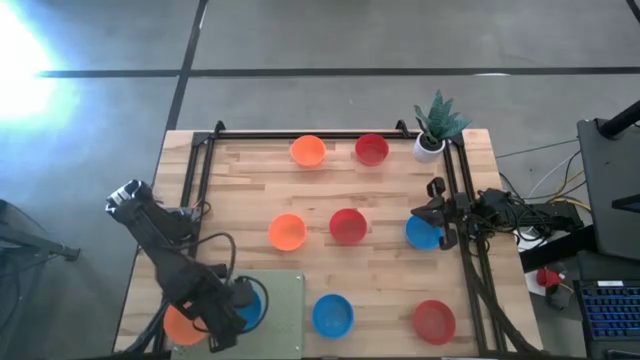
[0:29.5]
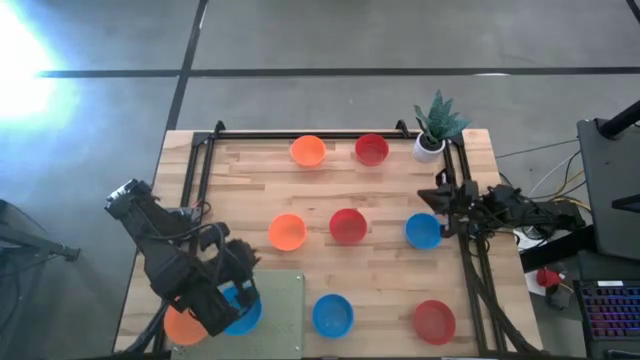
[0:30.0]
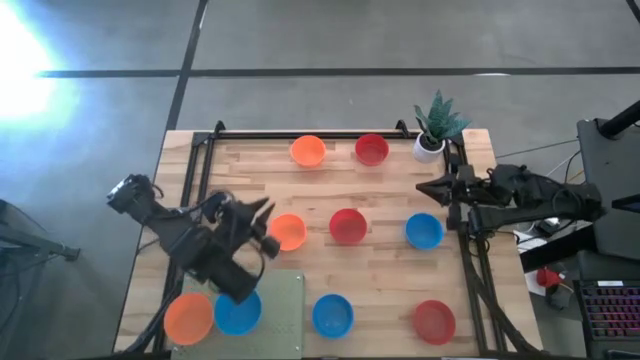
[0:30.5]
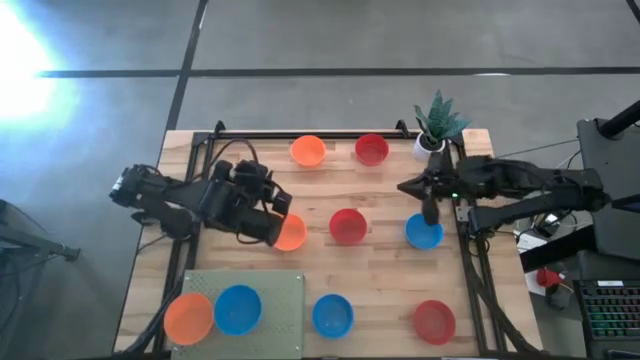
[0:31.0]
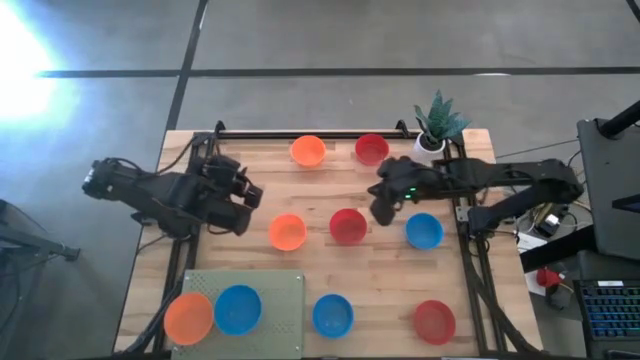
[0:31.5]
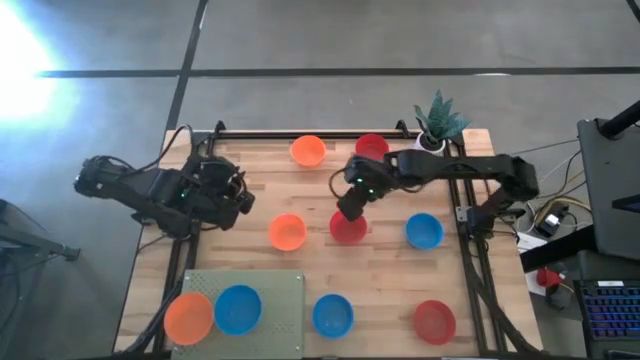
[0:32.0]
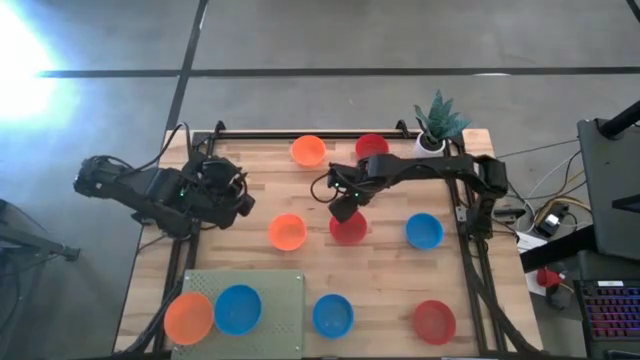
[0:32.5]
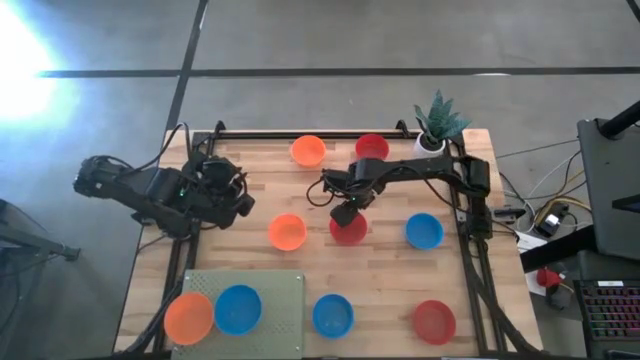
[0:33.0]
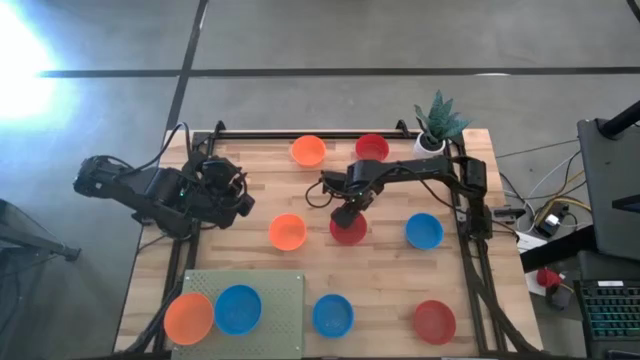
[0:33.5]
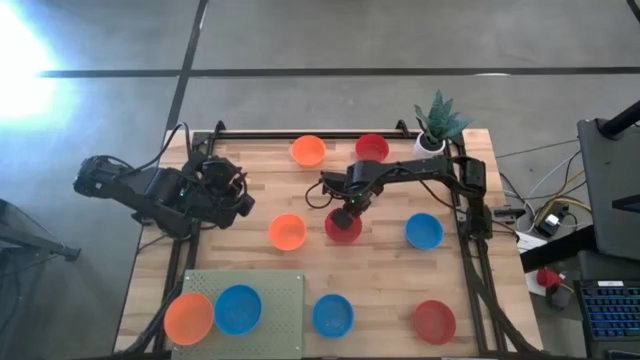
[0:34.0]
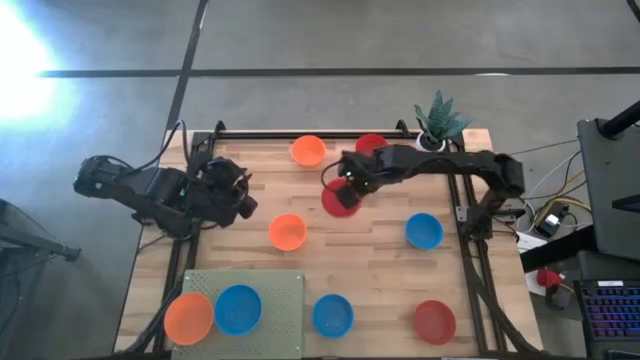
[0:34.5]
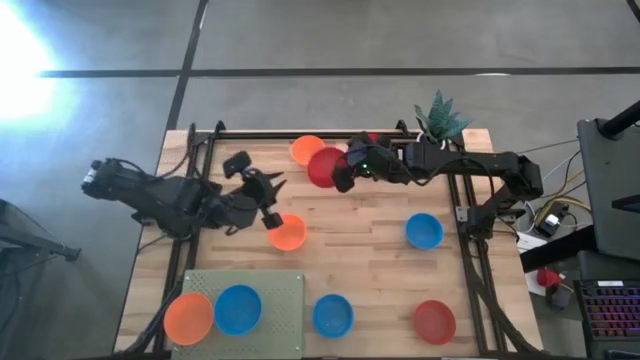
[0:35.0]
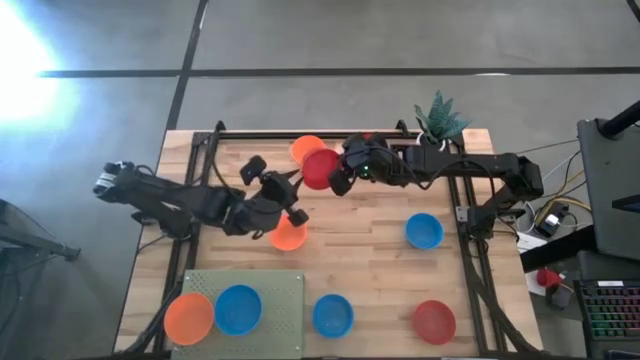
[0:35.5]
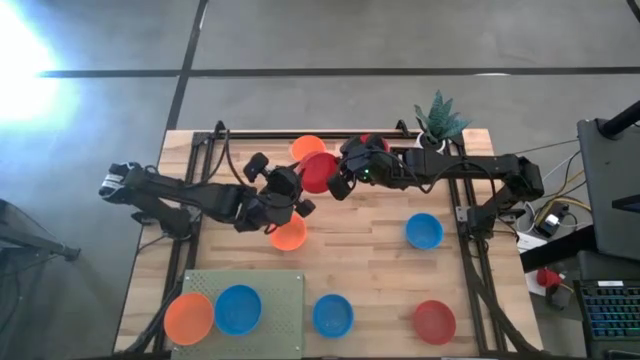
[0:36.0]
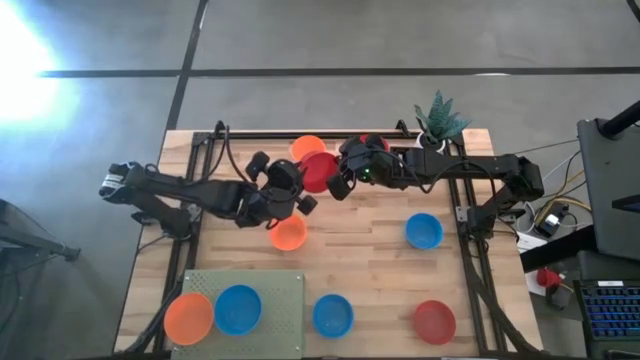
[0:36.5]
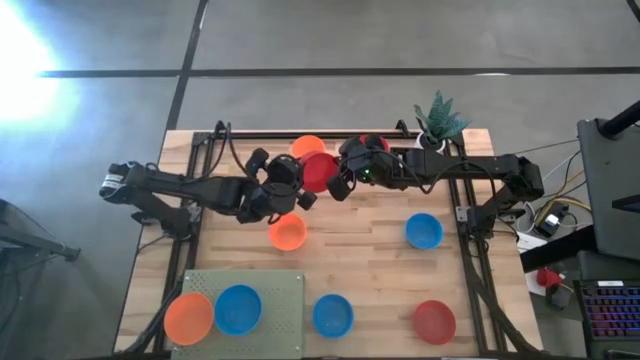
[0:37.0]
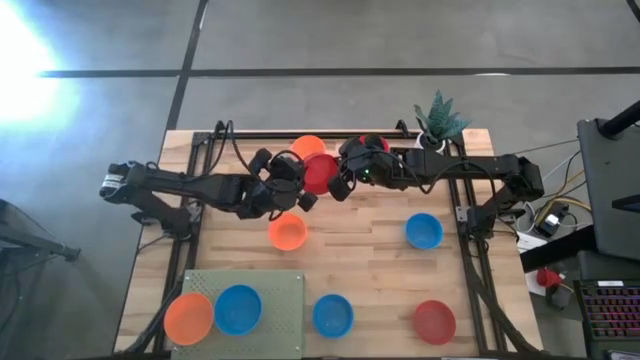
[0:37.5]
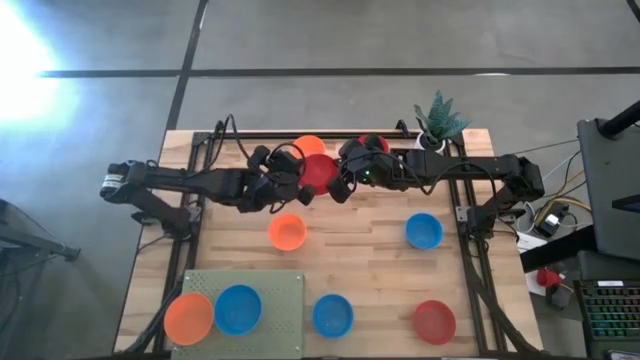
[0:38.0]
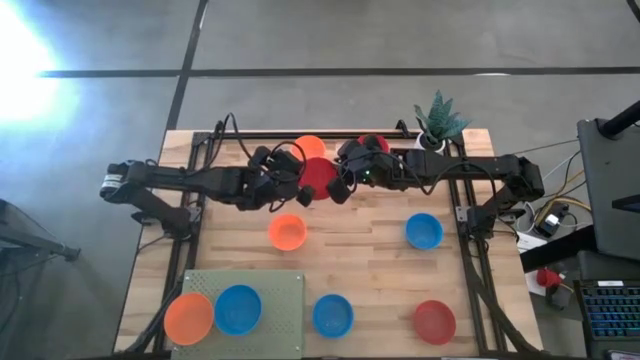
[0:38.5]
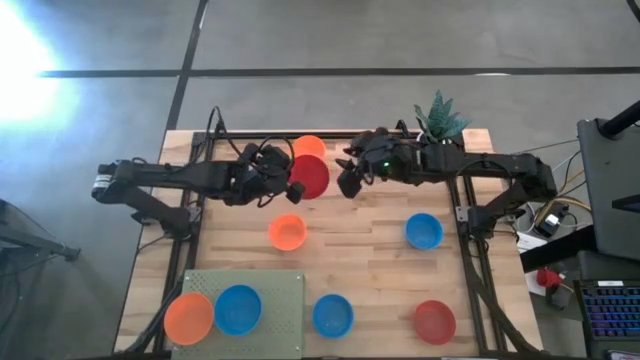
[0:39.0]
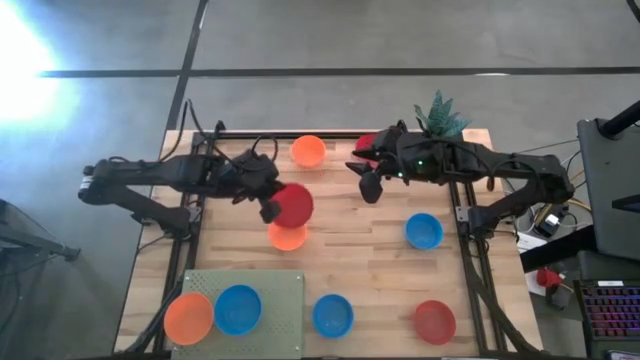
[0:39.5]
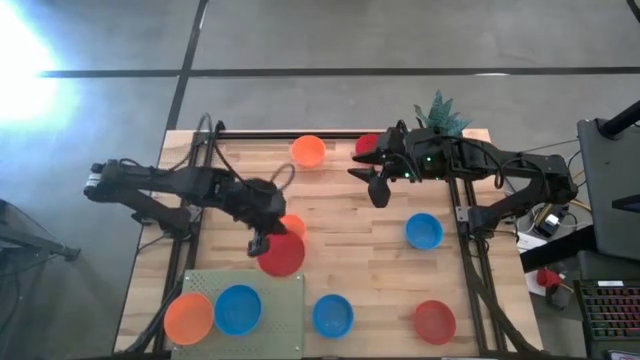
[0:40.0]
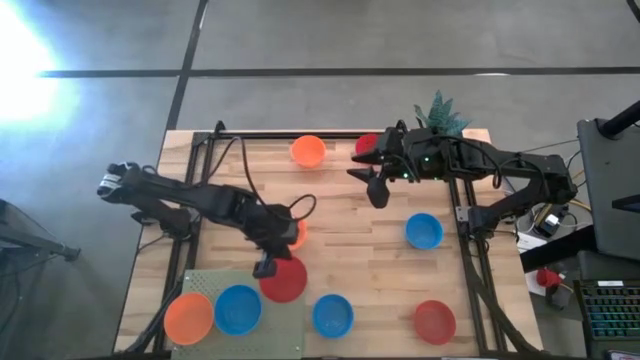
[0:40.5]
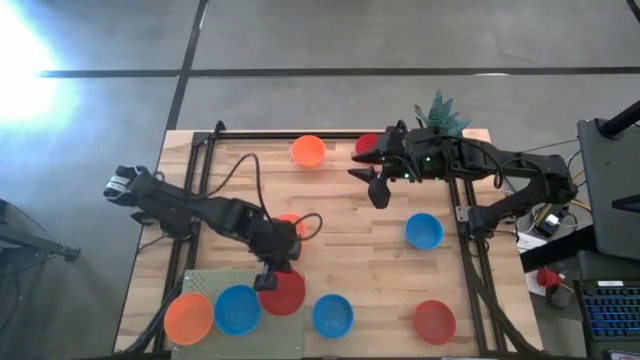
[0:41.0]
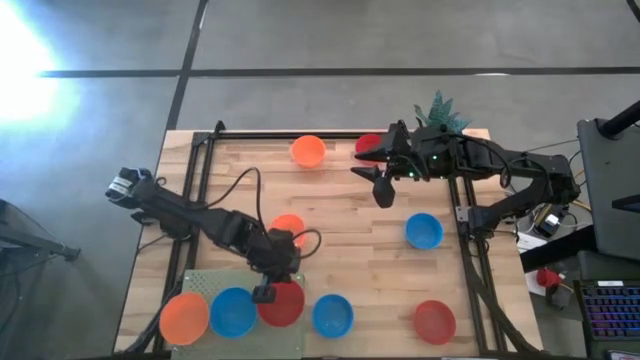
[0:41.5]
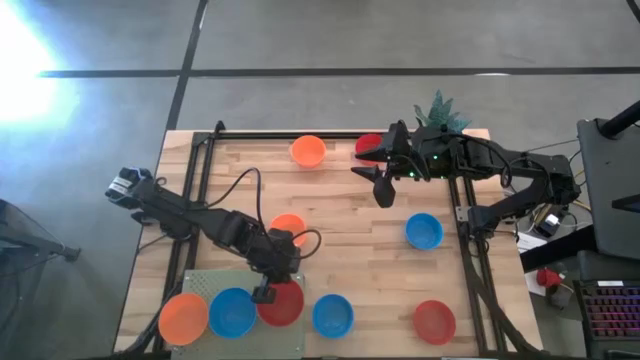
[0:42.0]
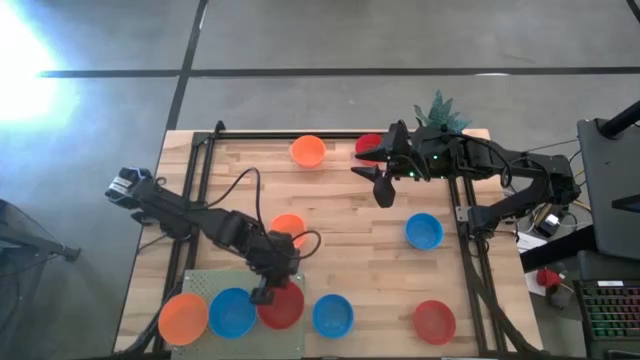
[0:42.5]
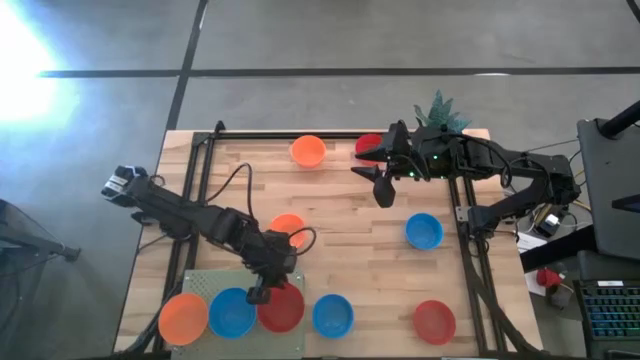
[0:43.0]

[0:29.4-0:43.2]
Task: Pick & Place Mini bowls
Put the middle left red bowl on the shelf

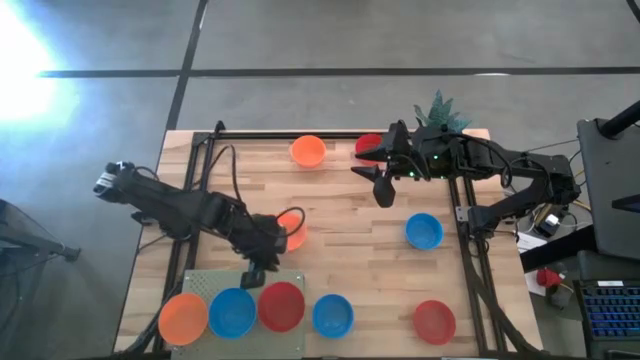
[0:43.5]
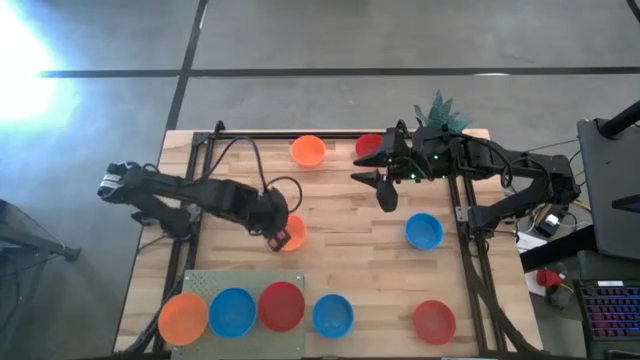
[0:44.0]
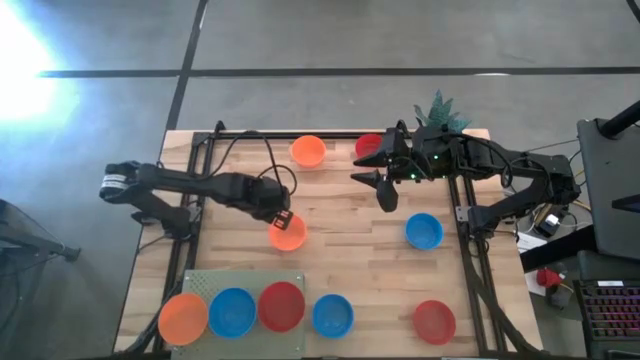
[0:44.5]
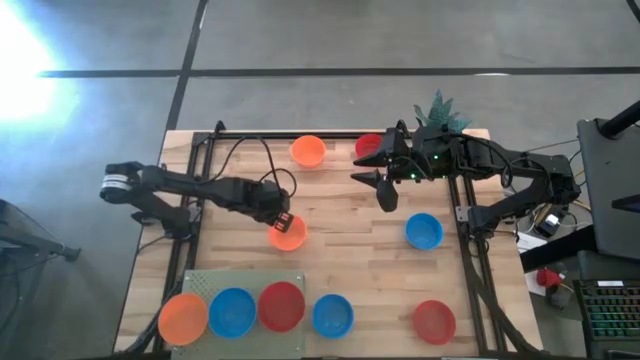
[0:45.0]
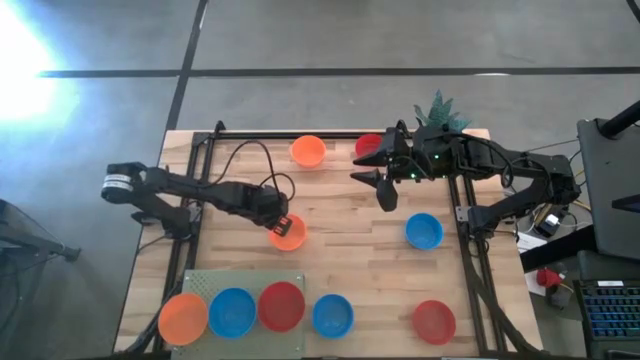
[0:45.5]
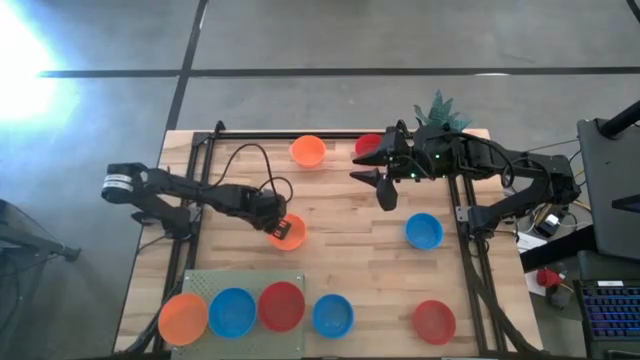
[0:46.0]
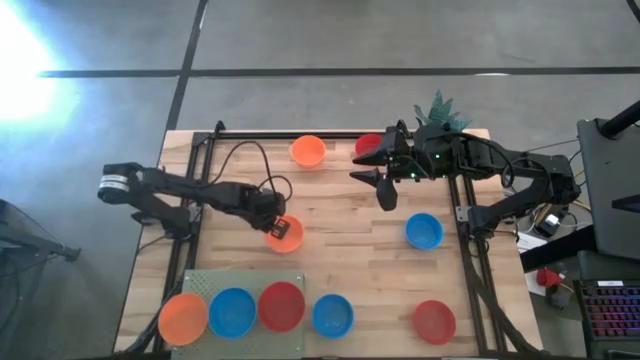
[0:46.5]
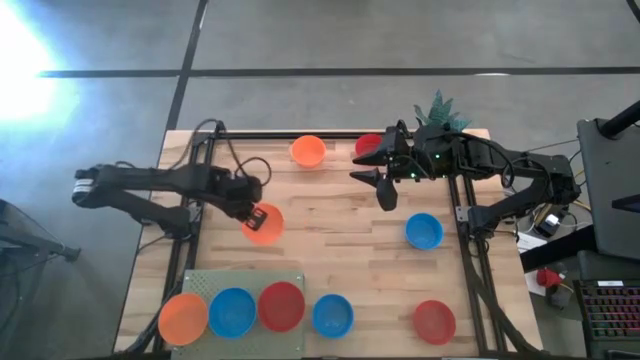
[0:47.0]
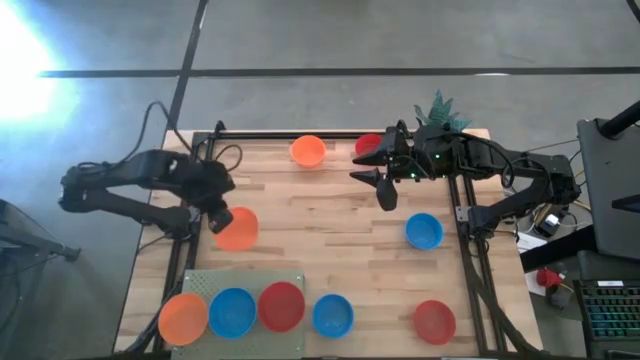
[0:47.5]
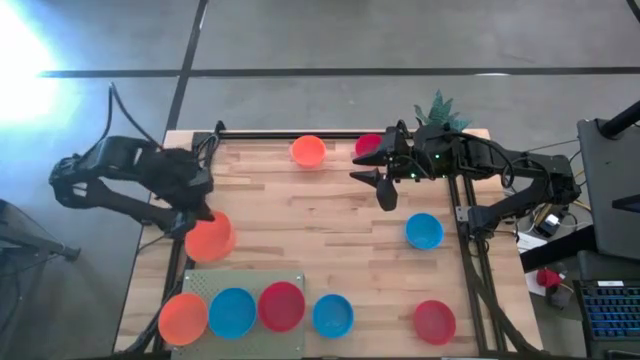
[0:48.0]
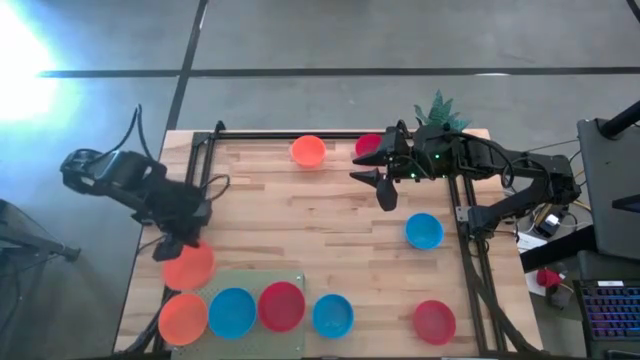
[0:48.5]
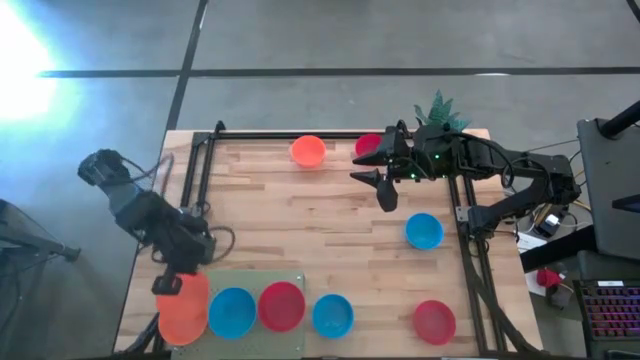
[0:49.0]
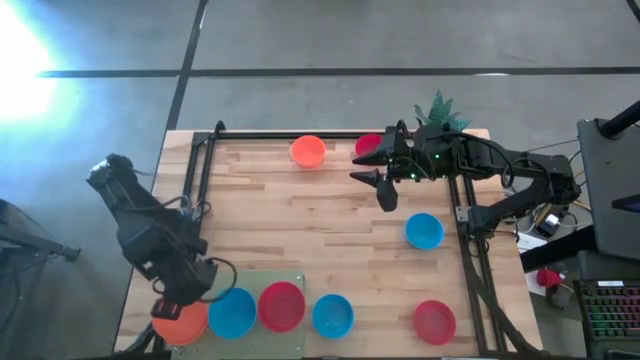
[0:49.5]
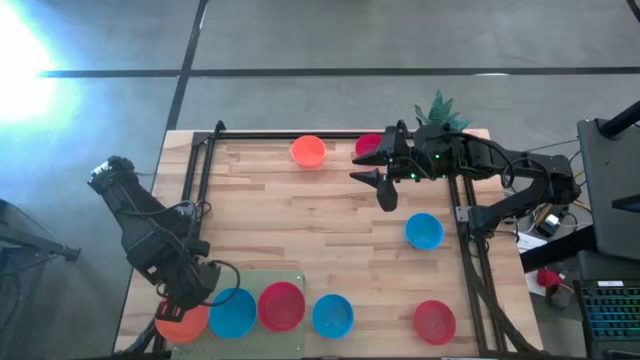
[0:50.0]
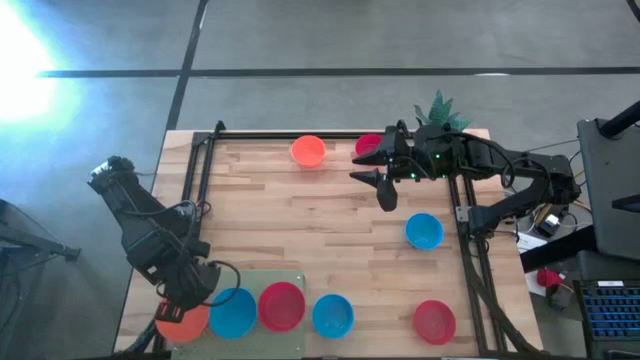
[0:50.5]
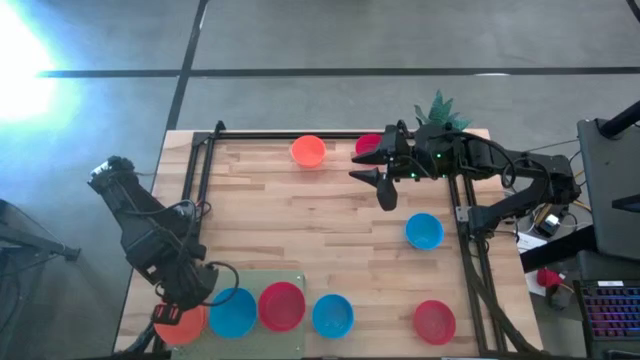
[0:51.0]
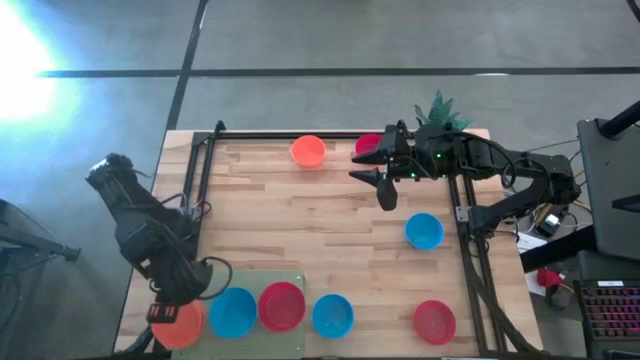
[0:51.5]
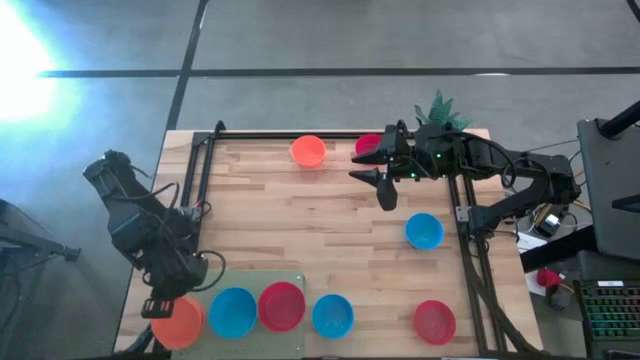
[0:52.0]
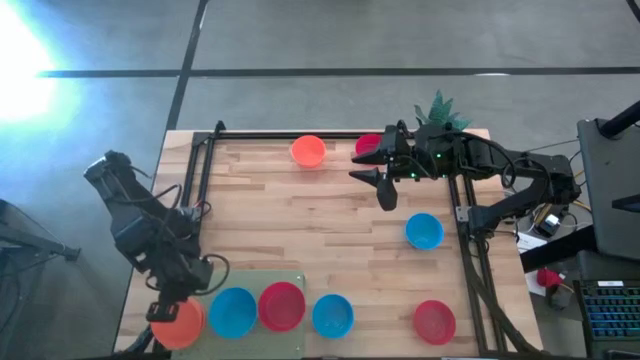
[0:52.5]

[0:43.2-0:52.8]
Stack the bottom orange bowl on the orange bowl on the shelf
